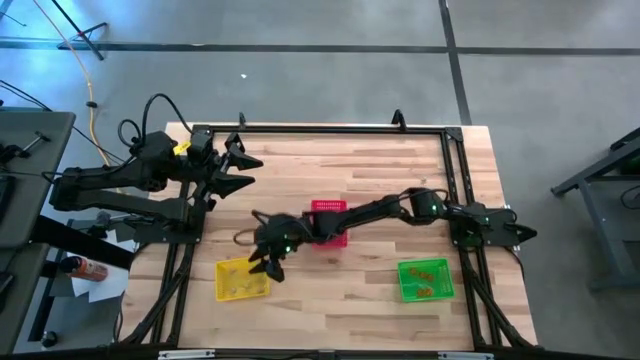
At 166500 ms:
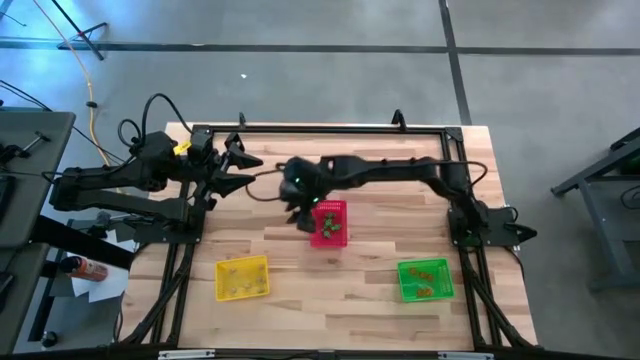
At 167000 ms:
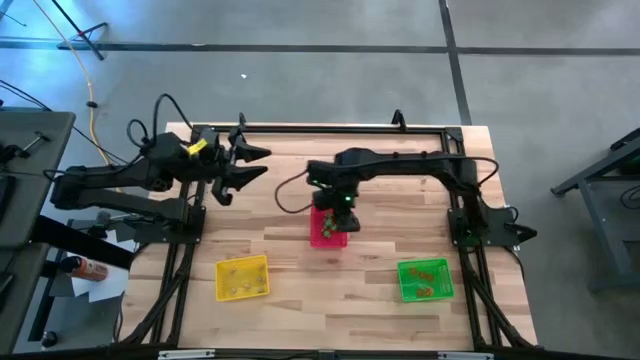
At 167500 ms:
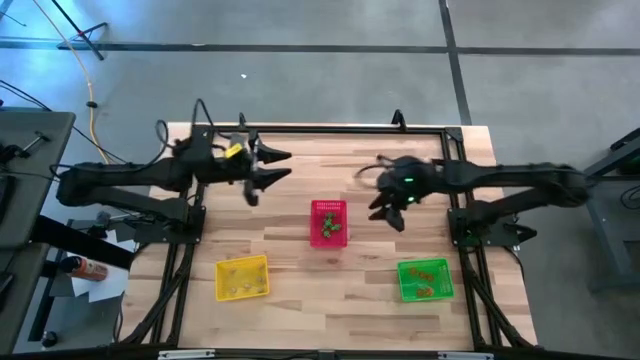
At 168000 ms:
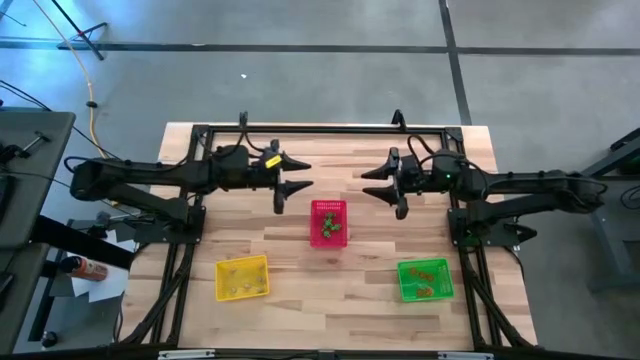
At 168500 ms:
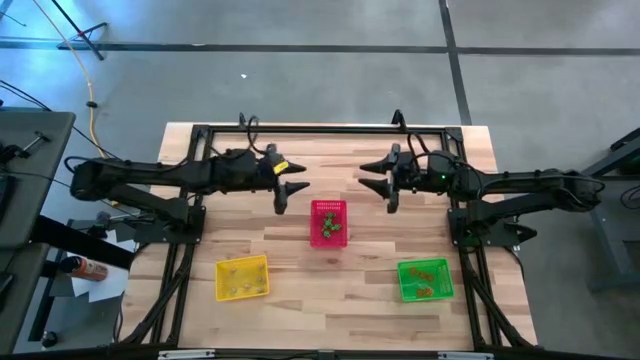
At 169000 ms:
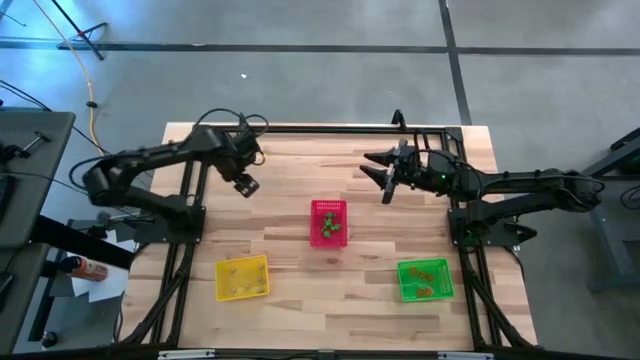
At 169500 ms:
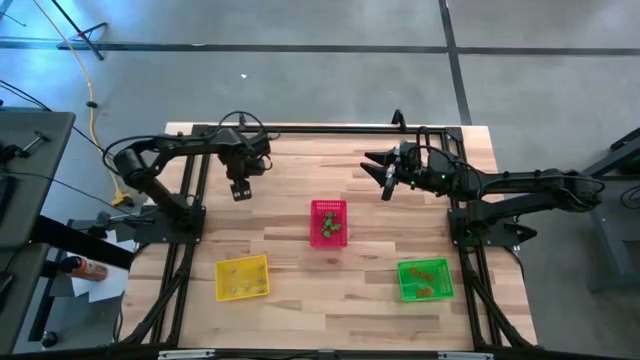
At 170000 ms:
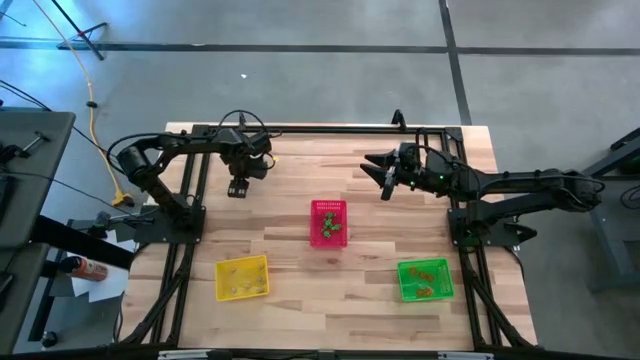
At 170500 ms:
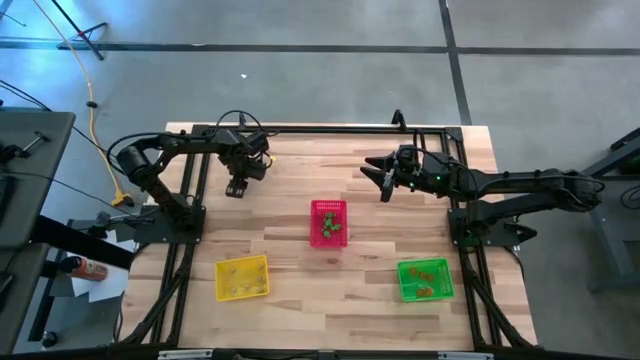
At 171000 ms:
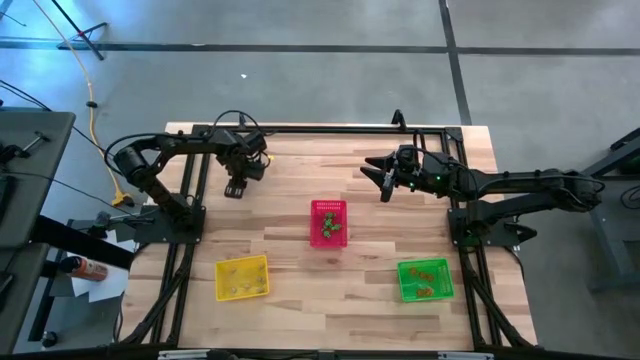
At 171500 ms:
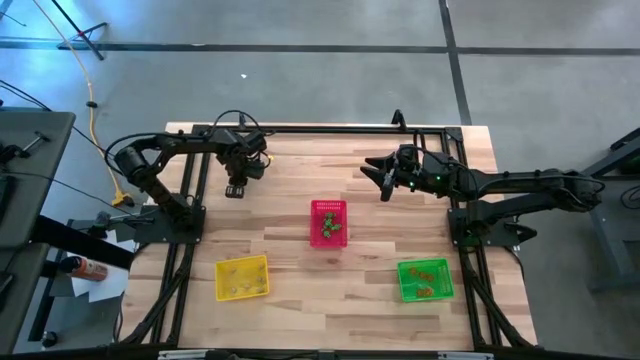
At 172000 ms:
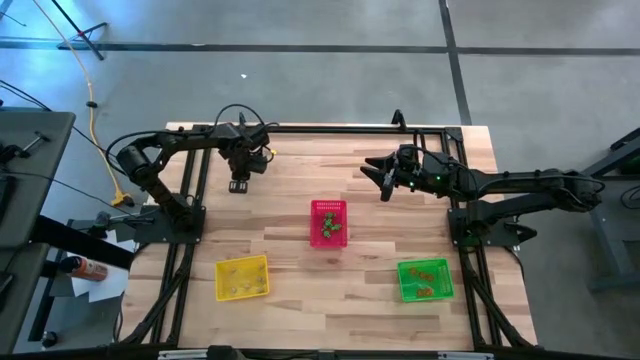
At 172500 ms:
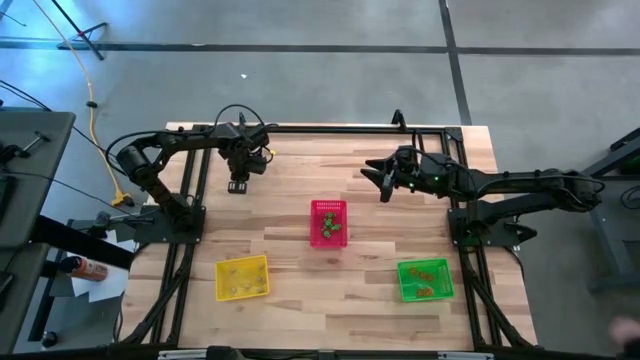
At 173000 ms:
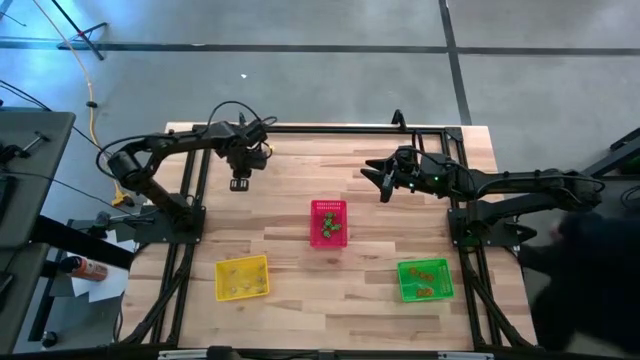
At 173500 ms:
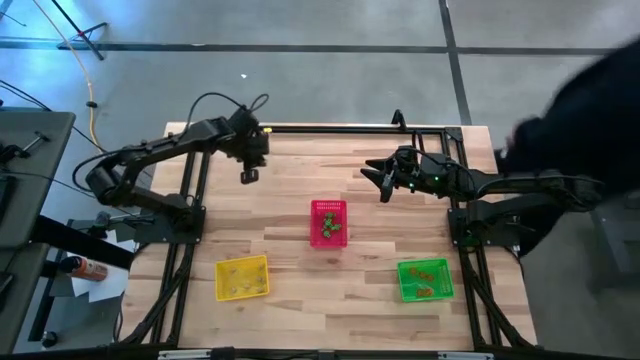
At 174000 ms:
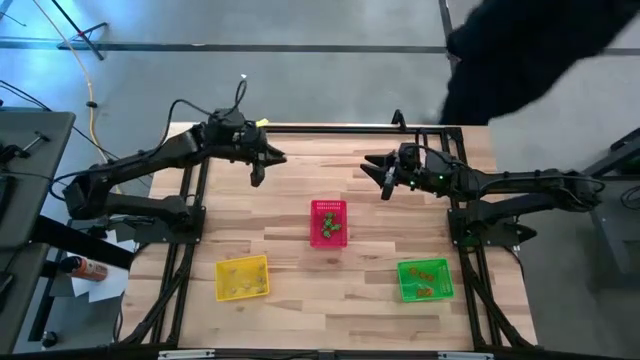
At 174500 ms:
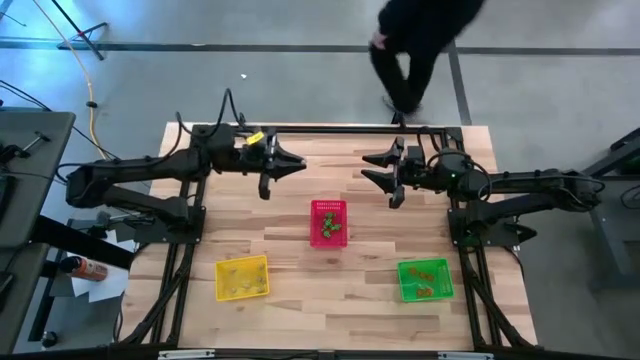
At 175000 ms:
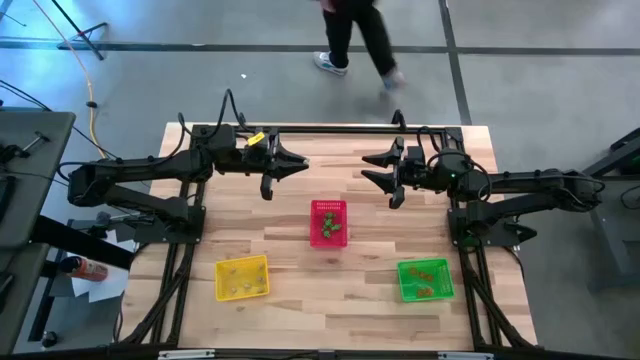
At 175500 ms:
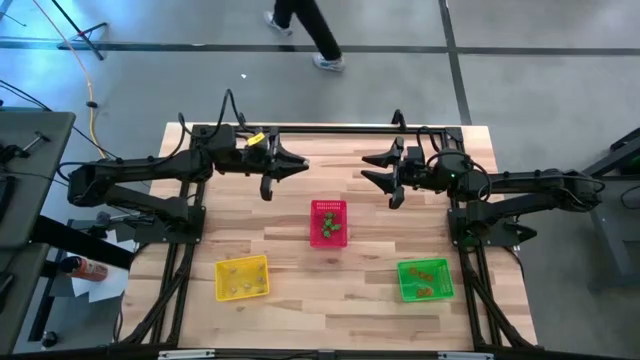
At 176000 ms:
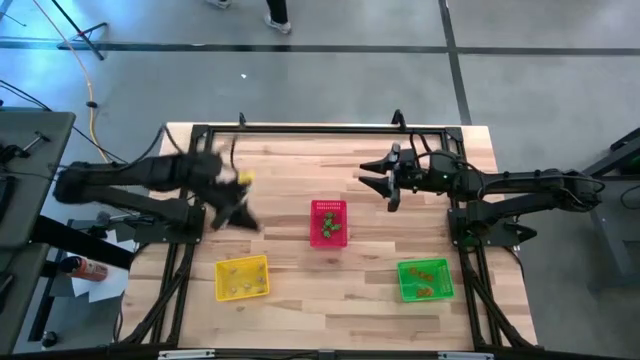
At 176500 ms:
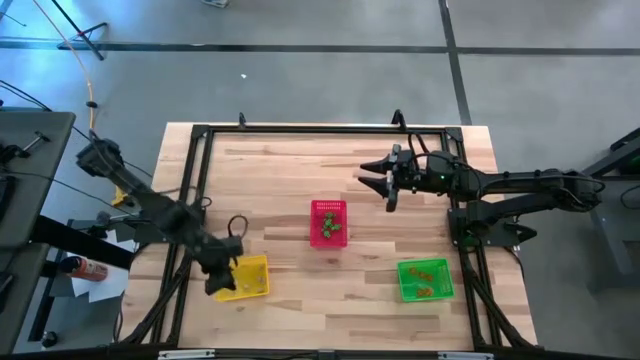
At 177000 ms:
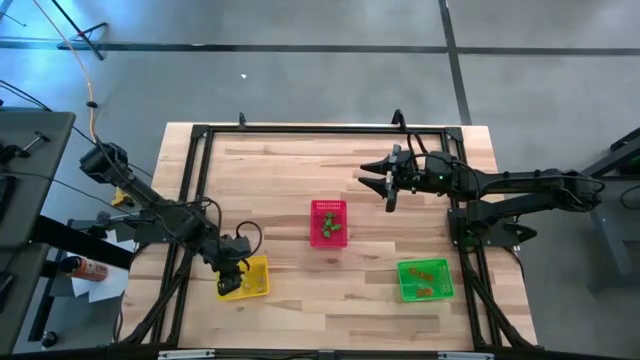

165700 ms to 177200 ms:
Task: Sort Halloween decoration
Put the white skull toy into the yellow bin

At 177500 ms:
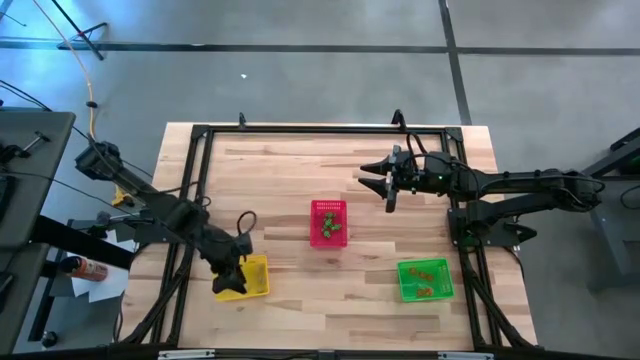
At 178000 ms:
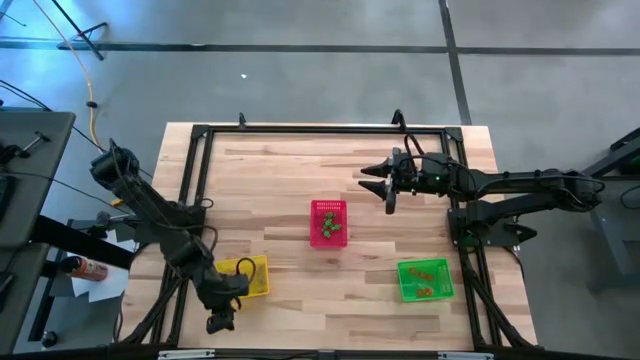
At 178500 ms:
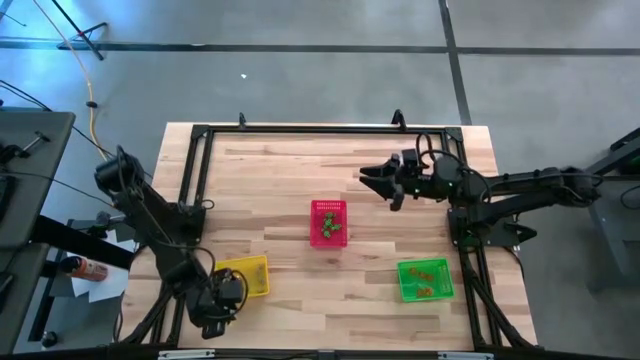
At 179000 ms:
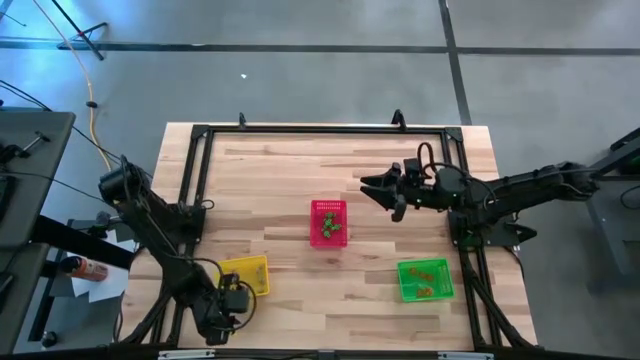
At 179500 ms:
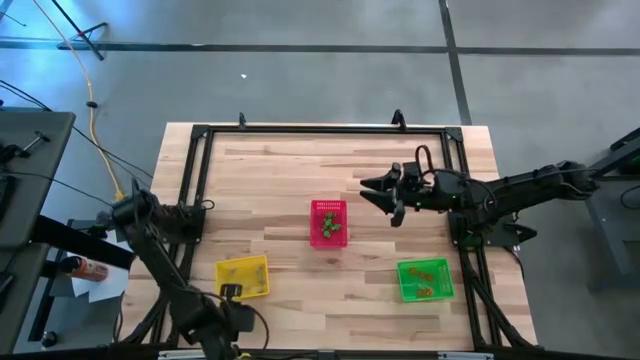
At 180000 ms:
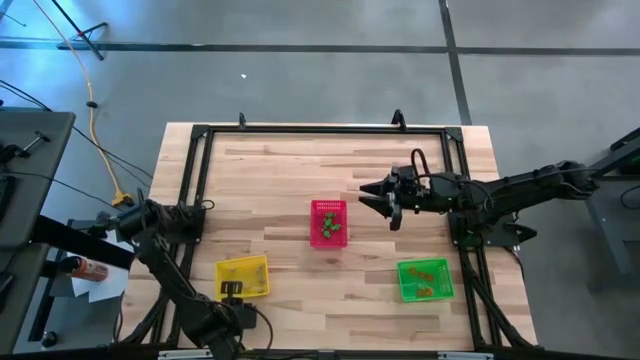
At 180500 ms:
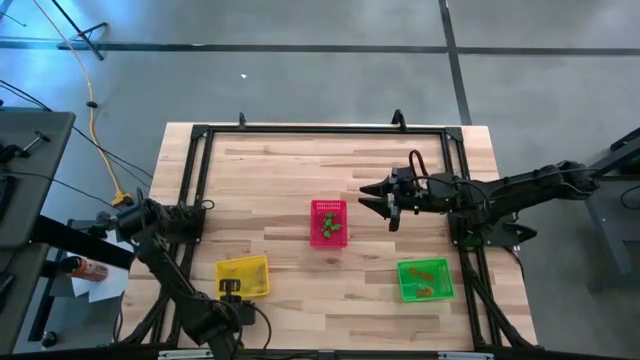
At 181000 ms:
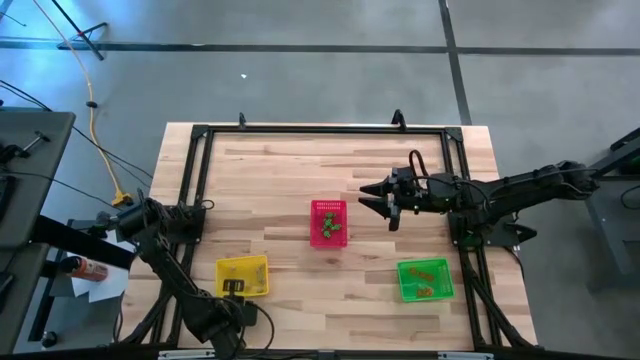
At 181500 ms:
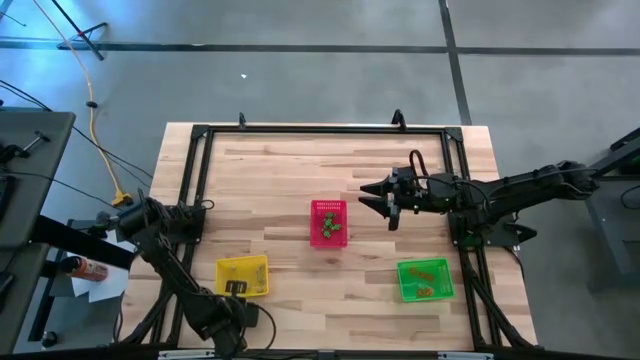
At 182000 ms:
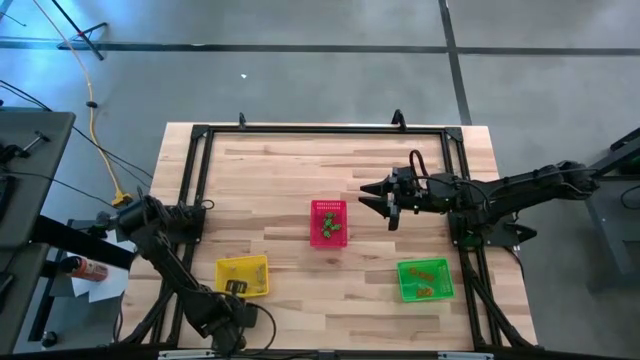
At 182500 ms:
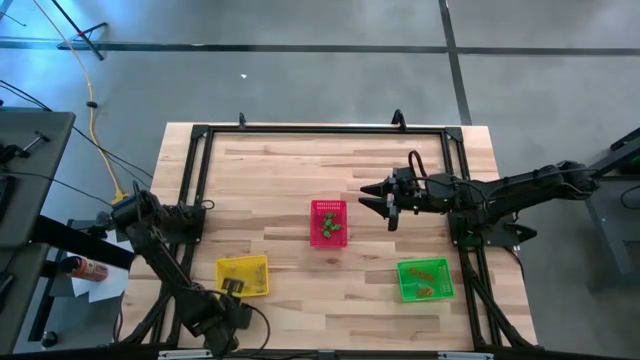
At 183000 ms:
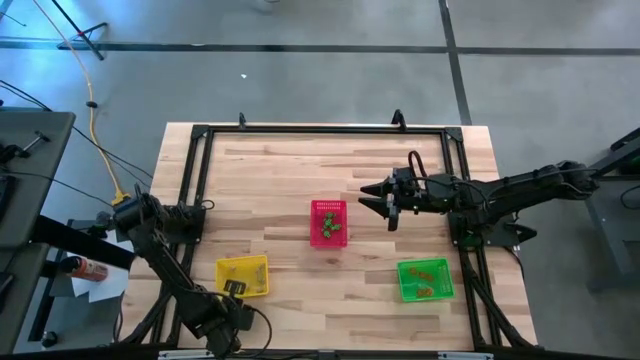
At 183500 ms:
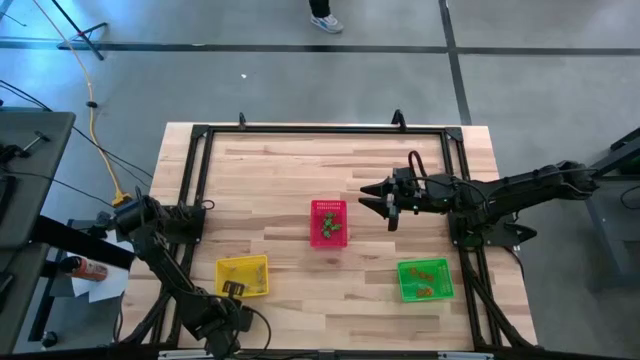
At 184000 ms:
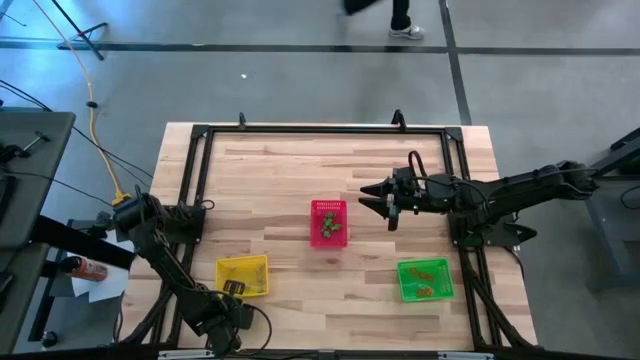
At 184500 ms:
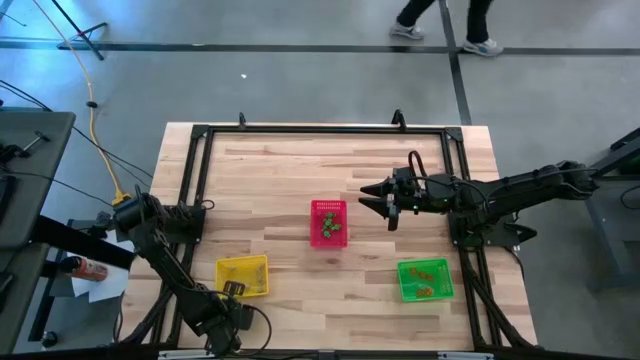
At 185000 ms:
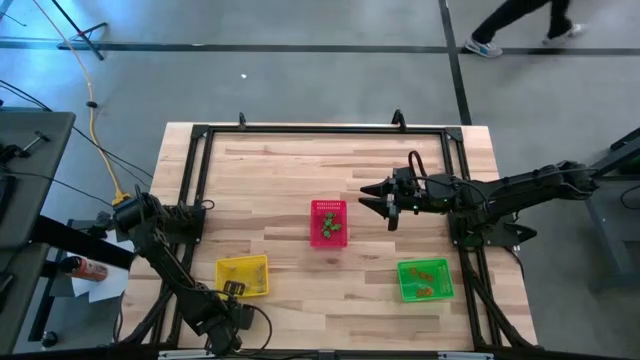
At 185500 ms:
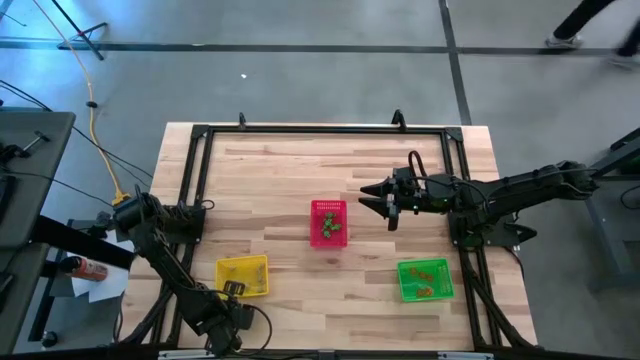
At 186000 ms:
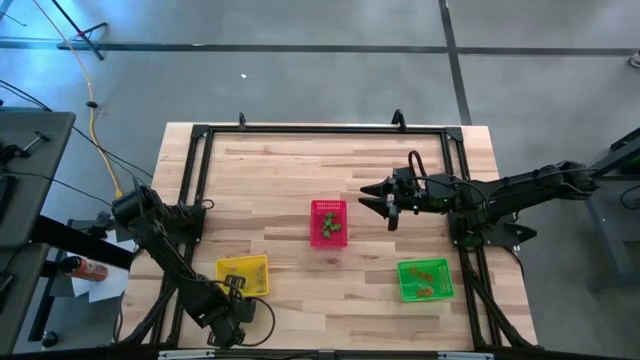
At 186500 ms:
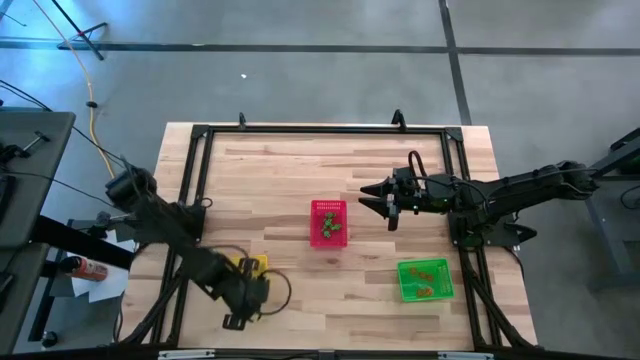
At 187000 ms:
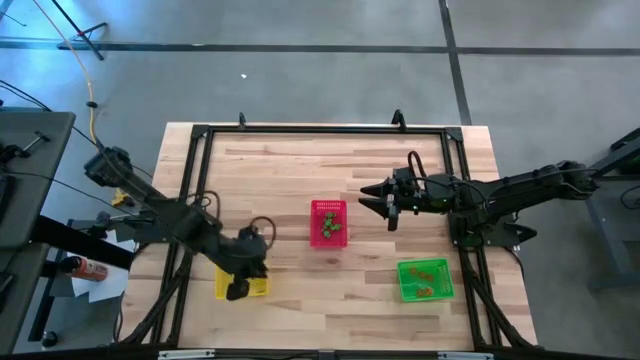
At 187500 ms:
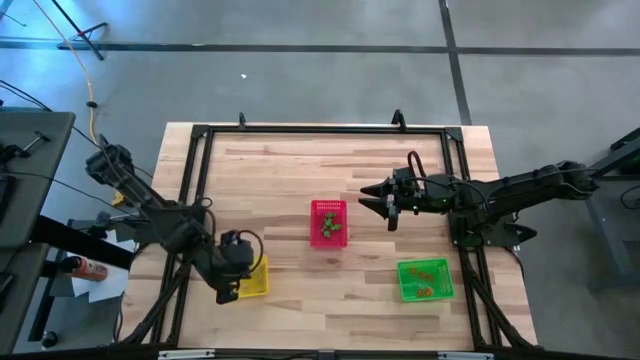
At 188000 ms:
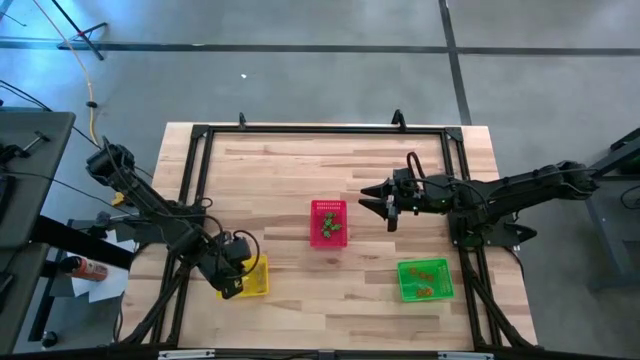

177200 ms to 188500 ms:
Put the white skull toy into the yellow bin
